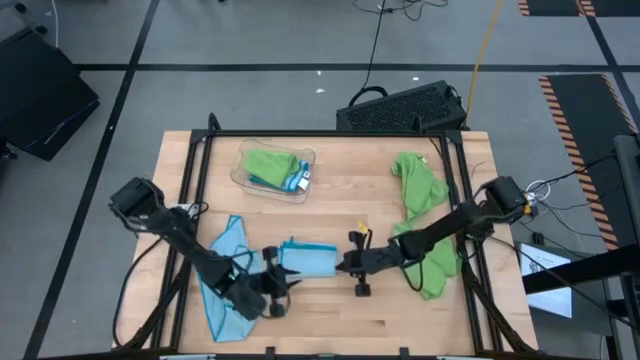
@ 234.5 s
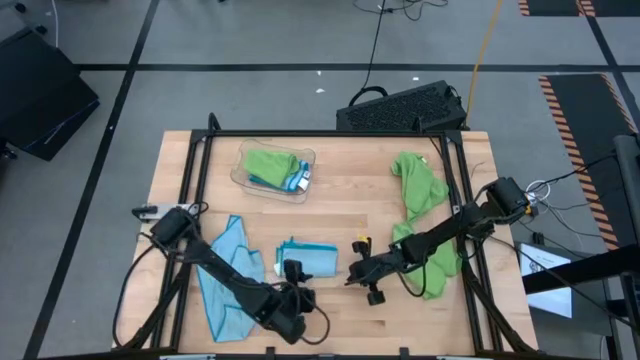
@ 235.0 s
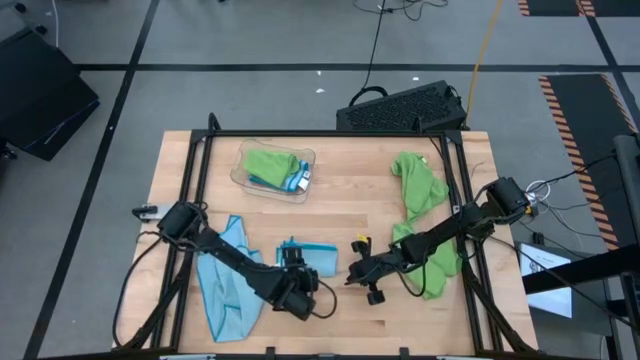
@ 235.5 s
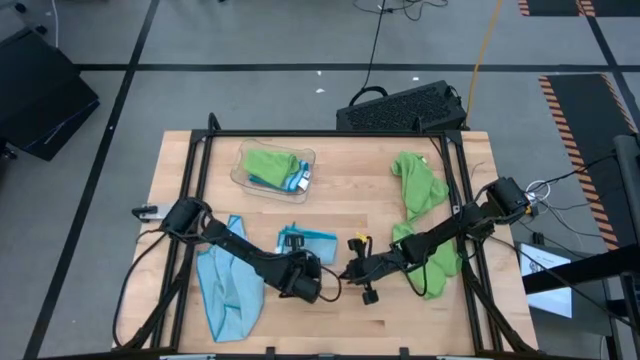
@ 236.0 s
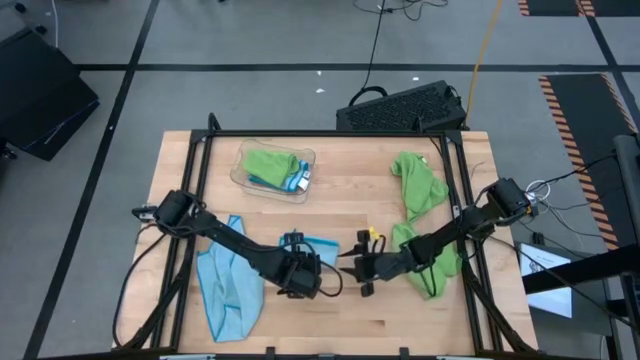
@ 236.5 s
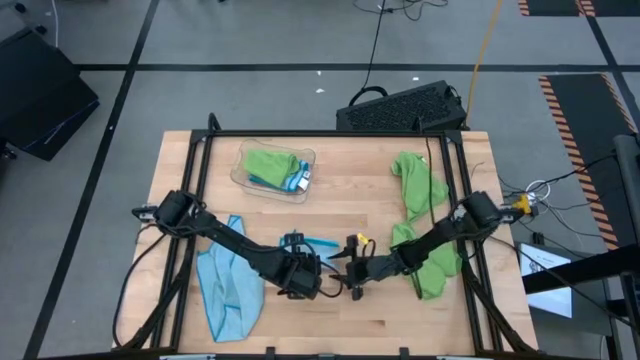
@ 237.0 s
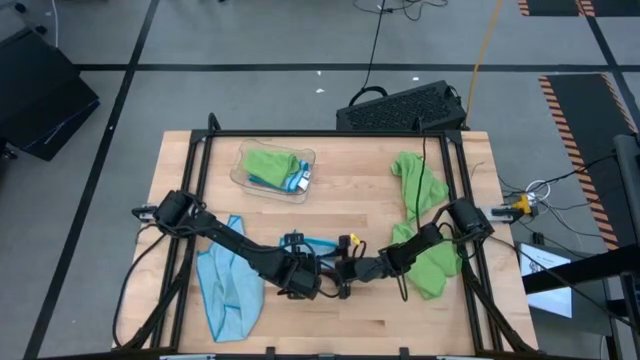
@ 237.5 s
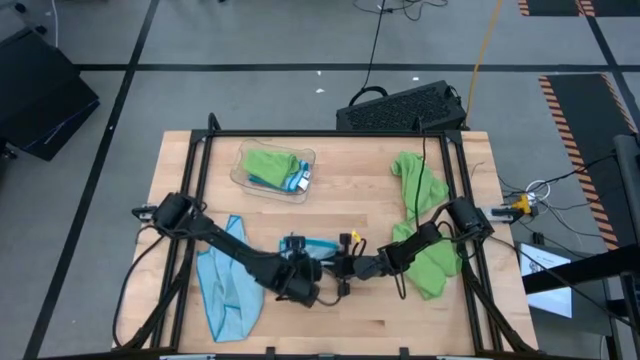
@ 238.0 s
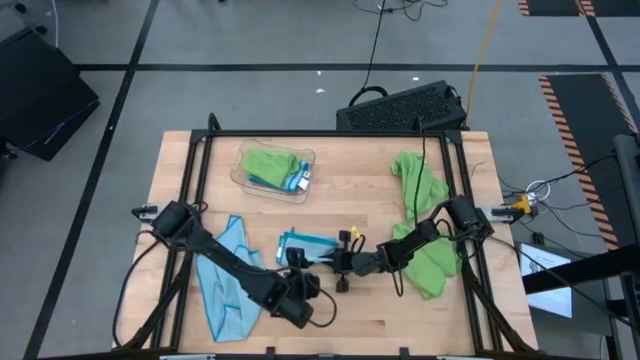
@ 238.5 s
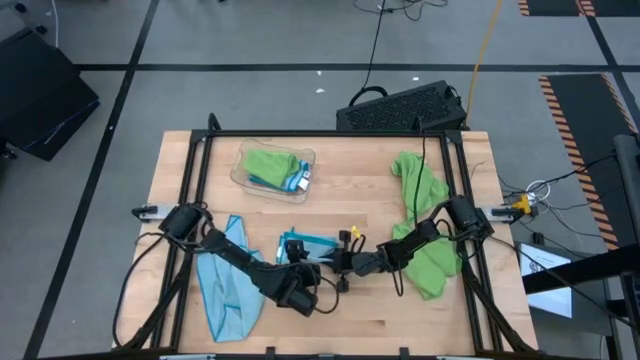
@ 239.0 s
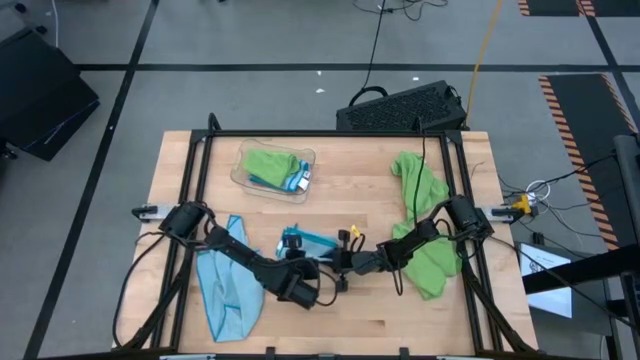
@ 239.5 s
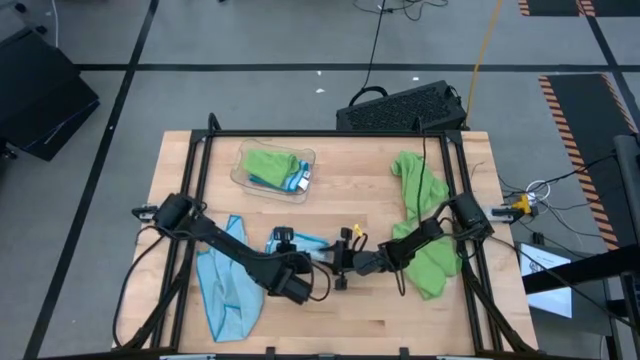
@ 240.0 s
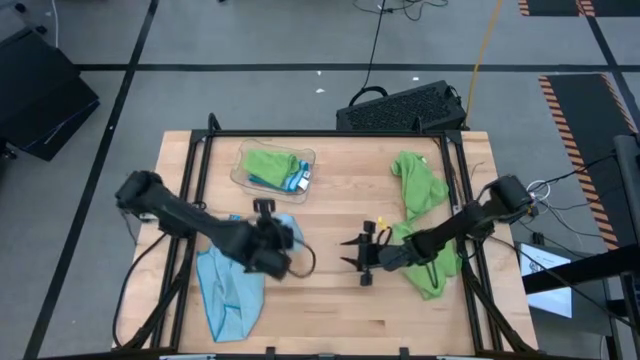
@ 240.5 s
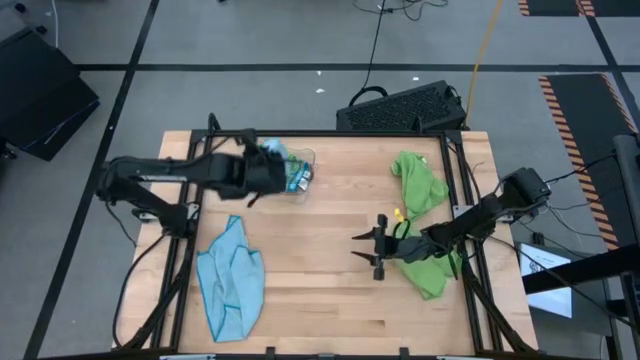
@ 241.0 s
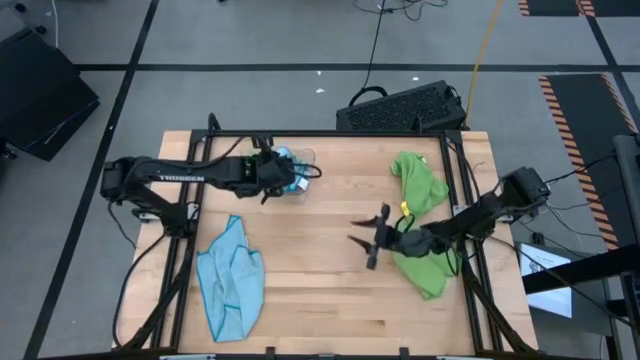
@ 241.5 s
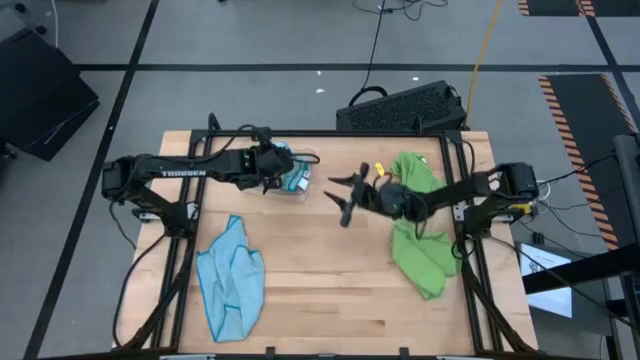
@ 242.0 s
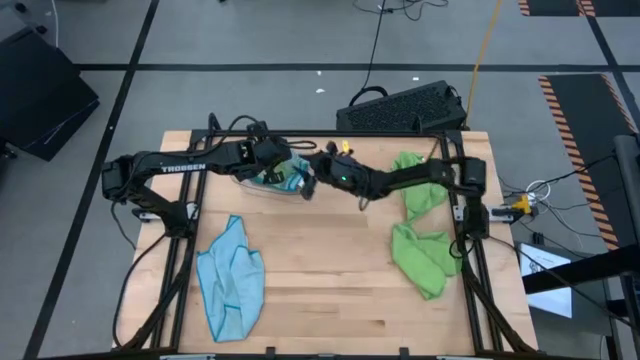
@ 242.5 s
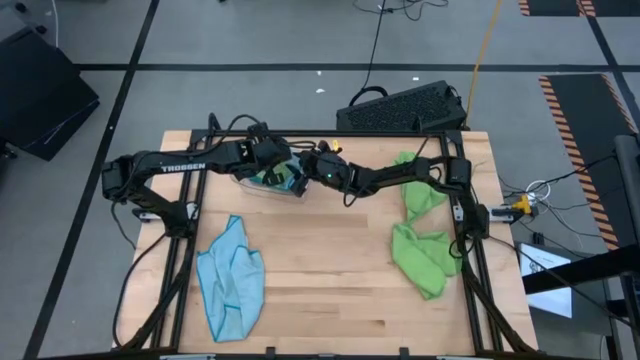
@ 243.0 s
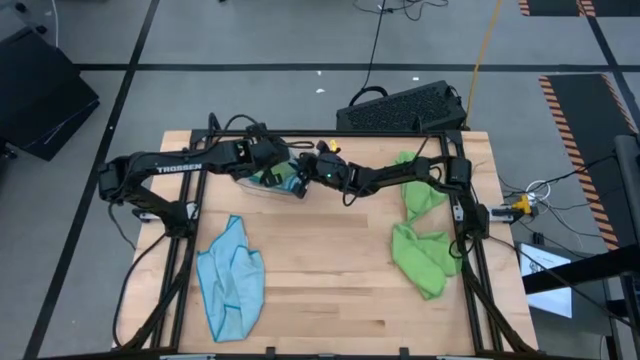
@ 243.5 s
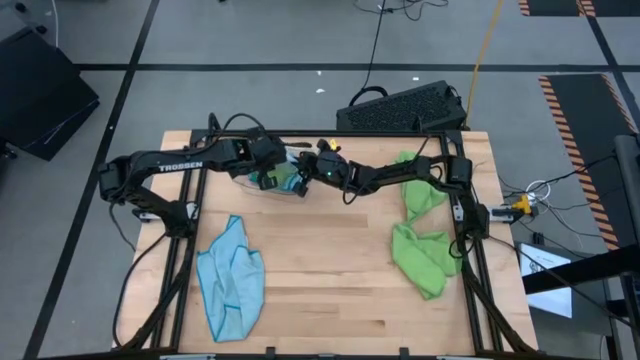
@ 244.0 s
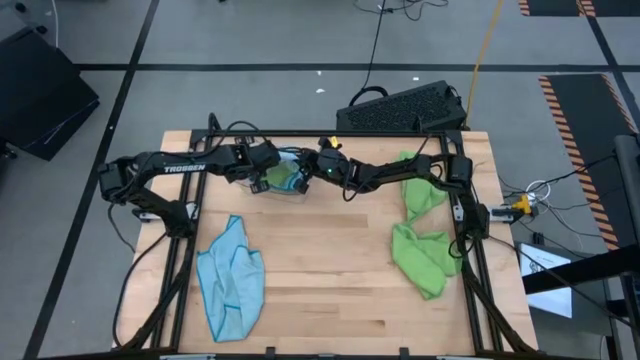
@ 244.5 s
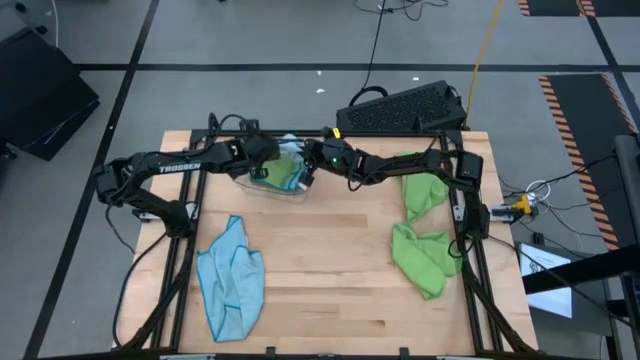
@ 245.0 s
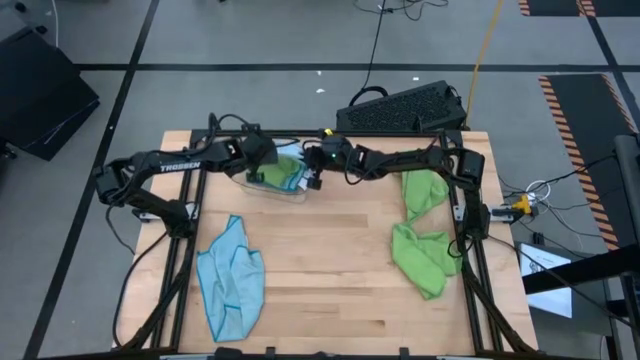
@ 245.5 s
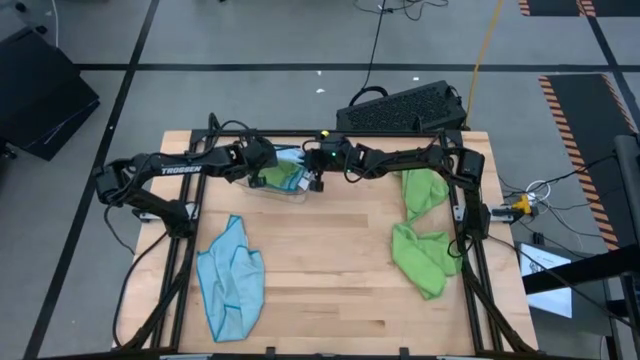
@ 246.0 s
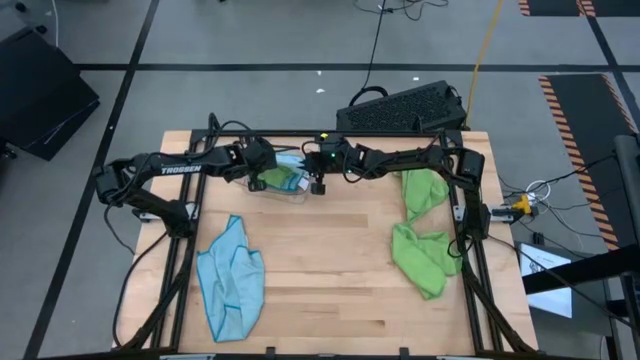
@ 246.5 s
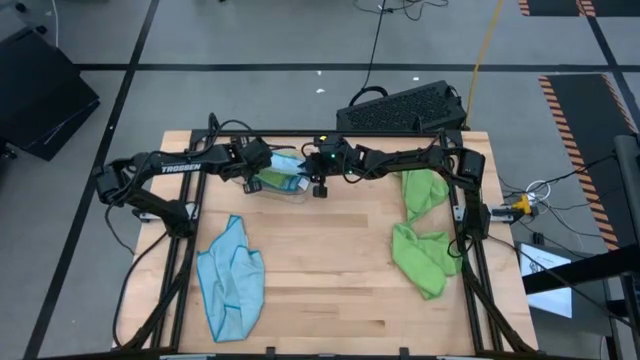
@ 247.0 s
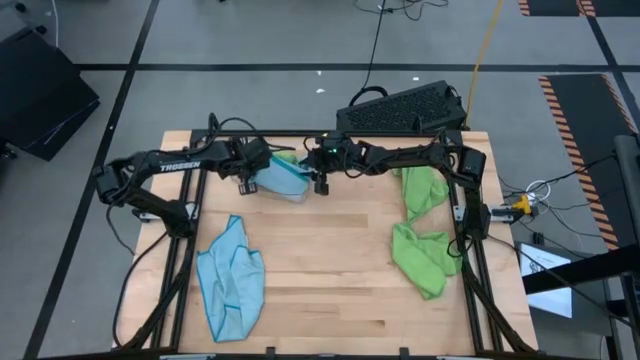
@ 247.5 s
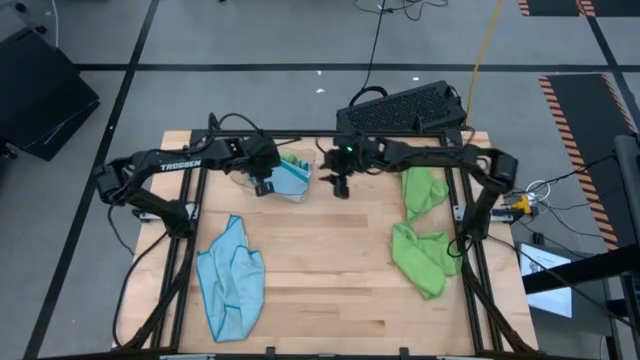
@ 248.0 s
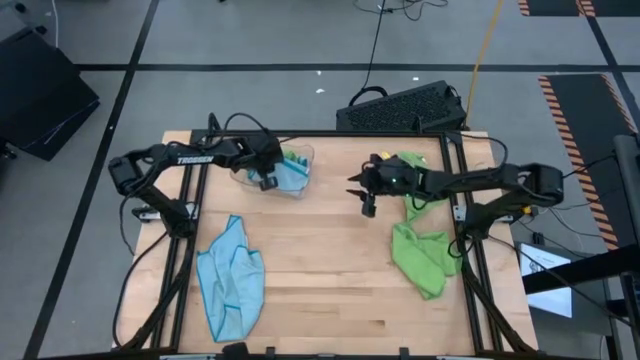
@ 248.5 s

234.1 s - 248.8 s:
Task: Fold microfiber towels
Put the right blue microfiber cloth into the bin

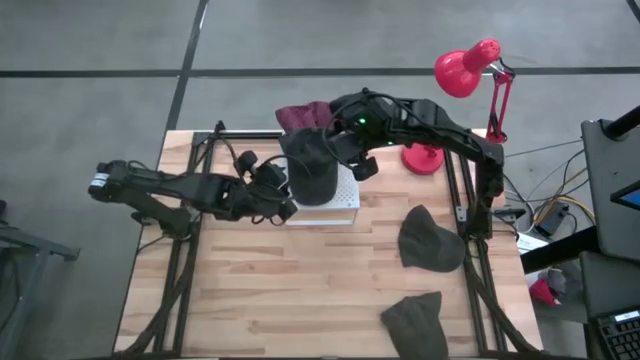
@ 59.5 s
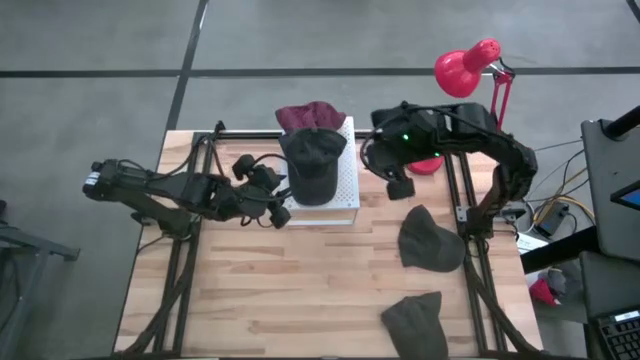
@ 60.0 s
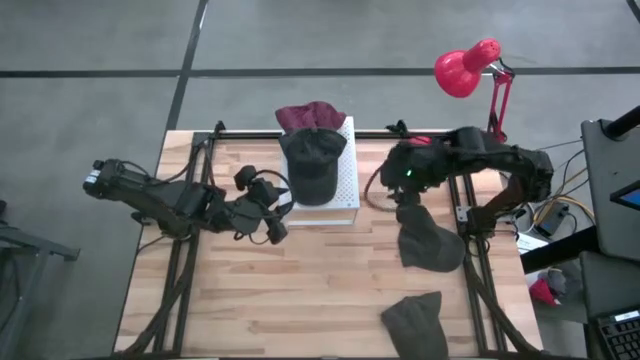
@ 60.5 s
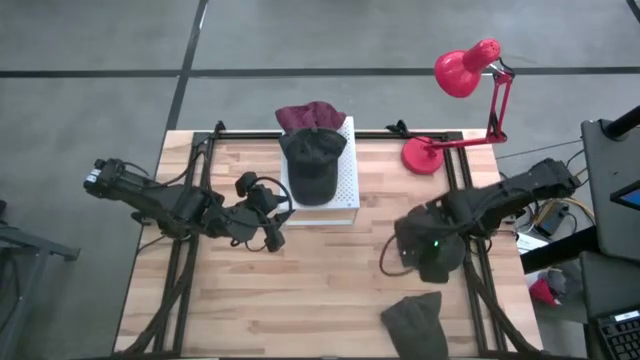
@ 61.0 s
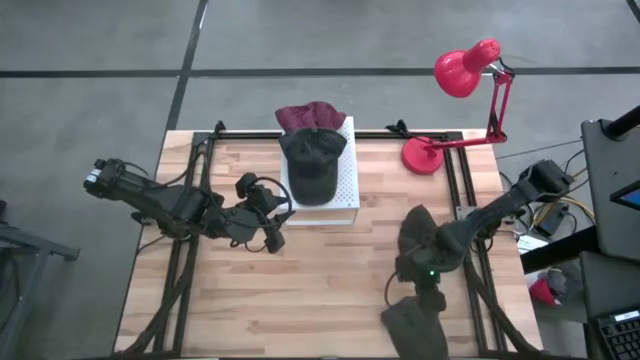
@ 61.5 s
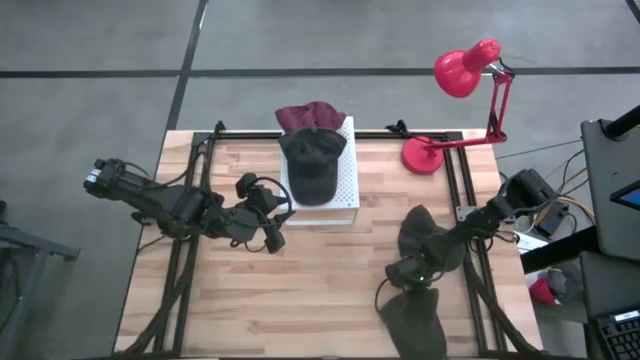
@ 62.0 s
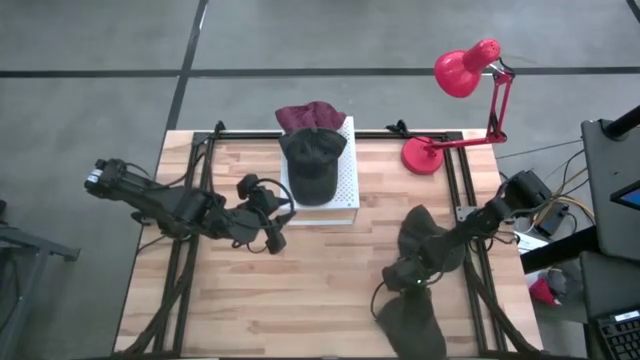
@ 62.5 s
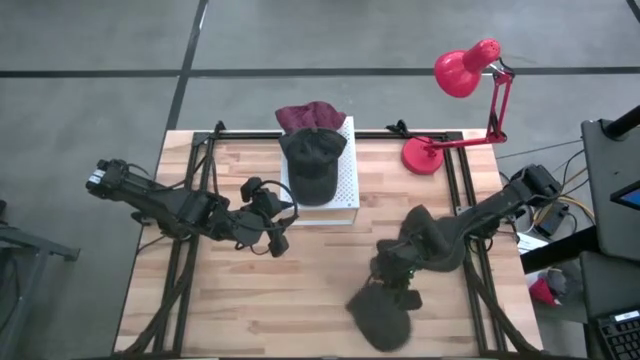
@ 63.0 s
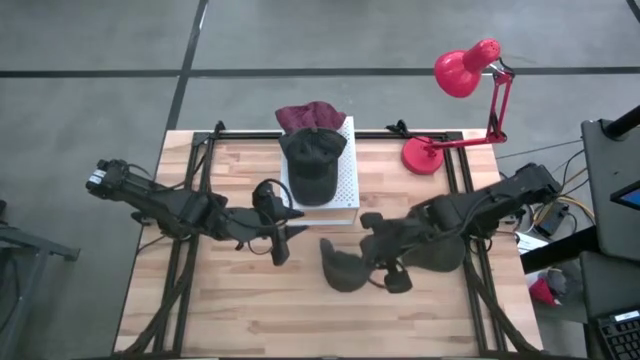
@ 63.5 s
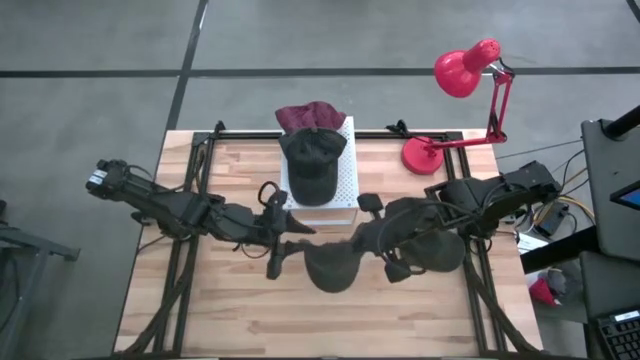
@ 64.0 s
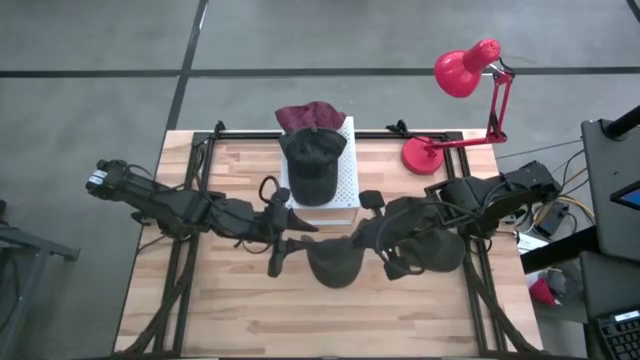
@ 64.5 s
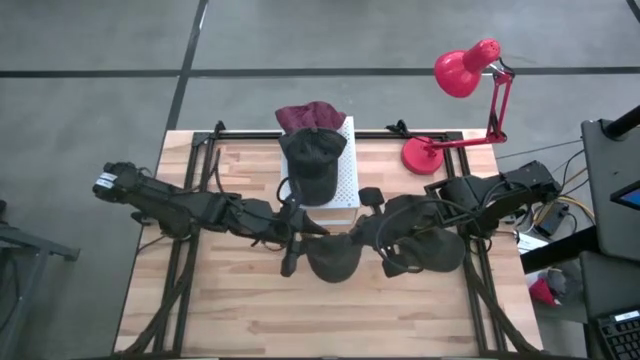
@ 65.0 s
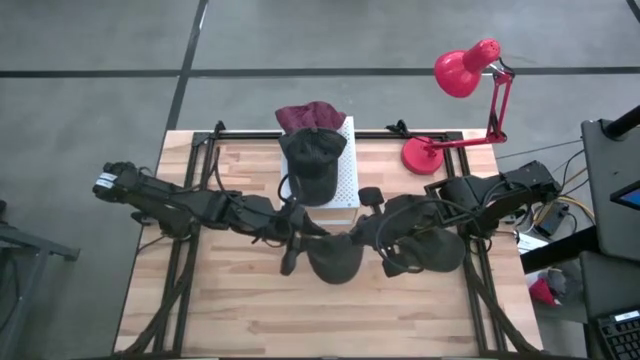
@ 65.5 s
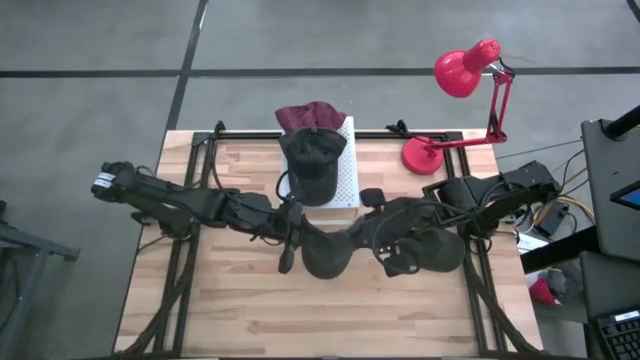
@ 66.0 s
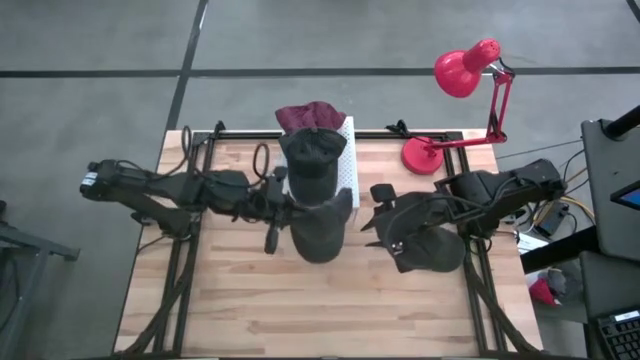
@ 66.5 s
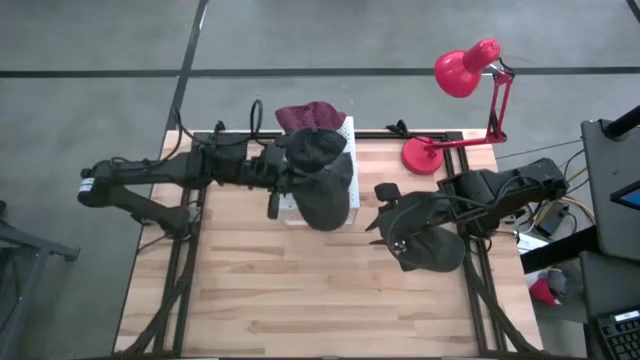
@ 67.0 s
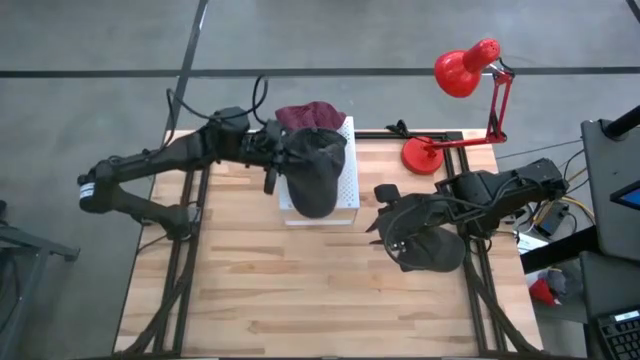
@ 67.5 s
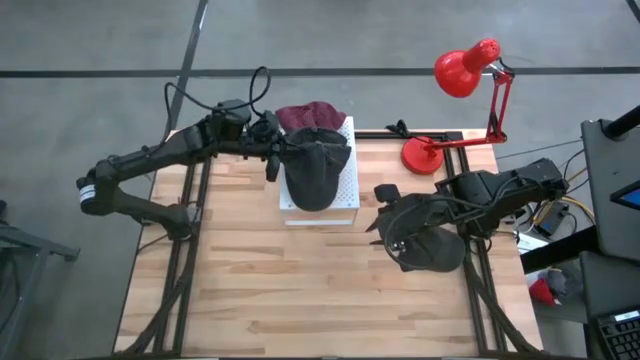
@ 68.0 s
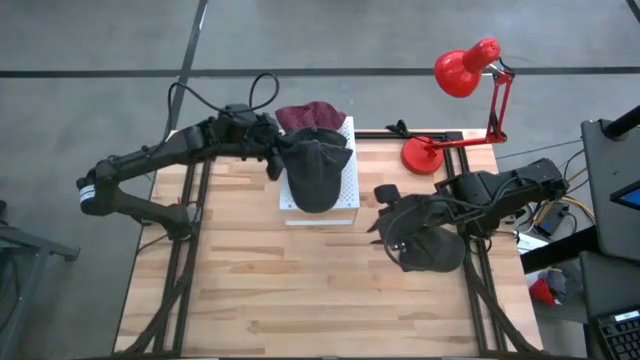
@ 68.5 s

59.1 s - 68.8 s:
Task: Pick & Place hat
Stack the bottom black cap on the black cap on the shelf
